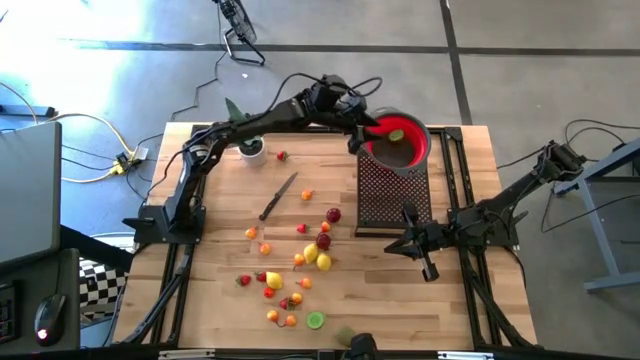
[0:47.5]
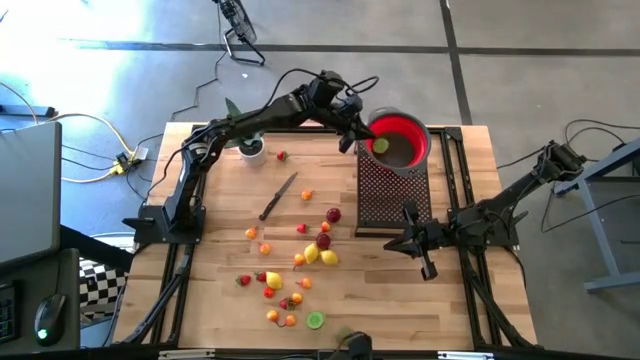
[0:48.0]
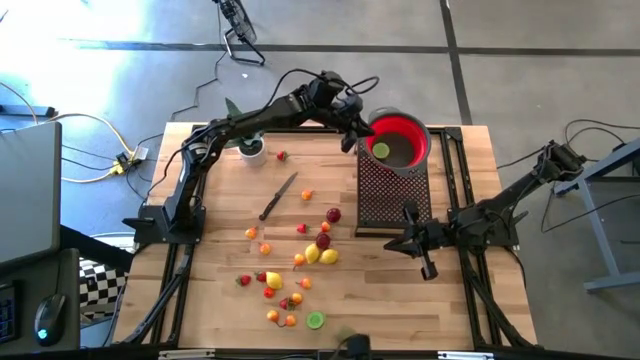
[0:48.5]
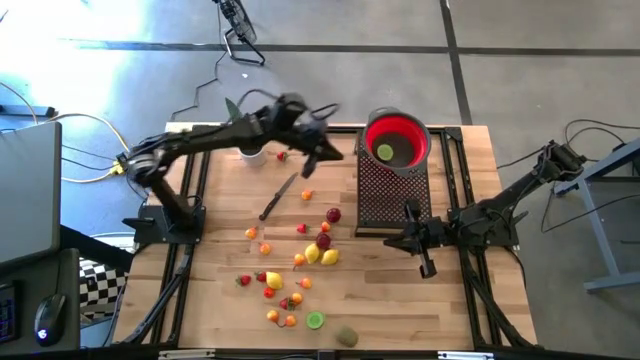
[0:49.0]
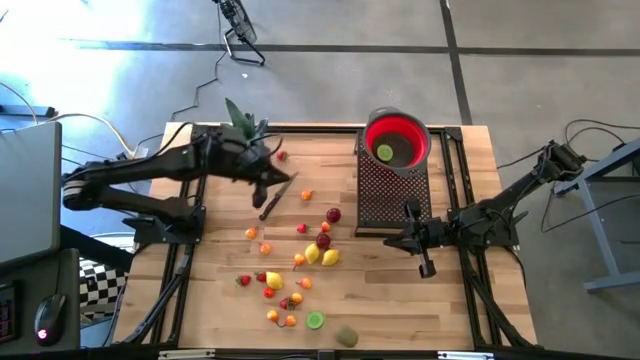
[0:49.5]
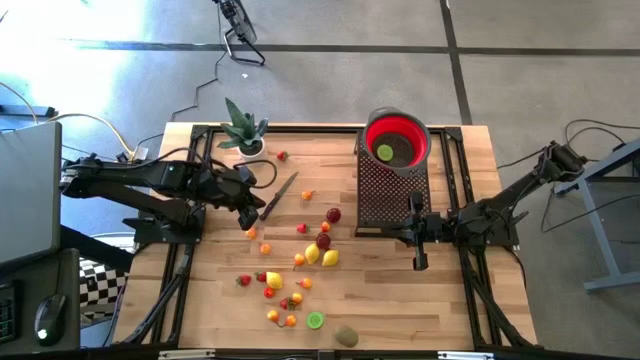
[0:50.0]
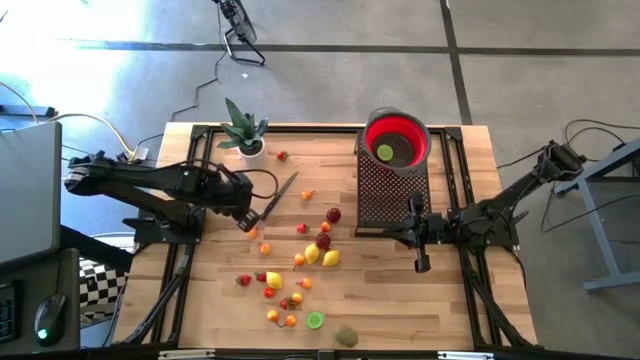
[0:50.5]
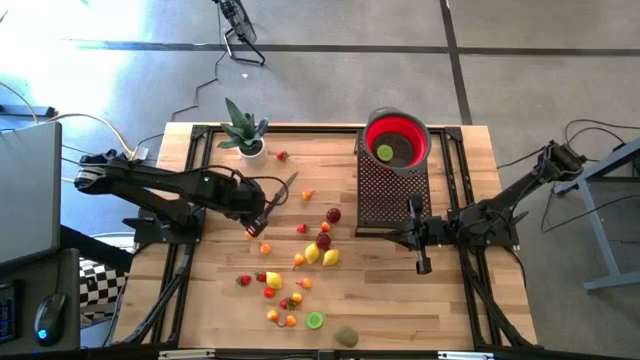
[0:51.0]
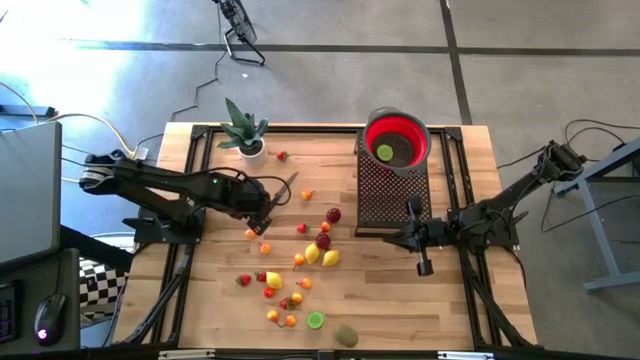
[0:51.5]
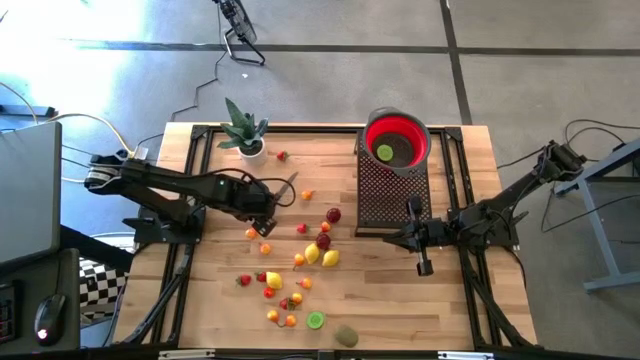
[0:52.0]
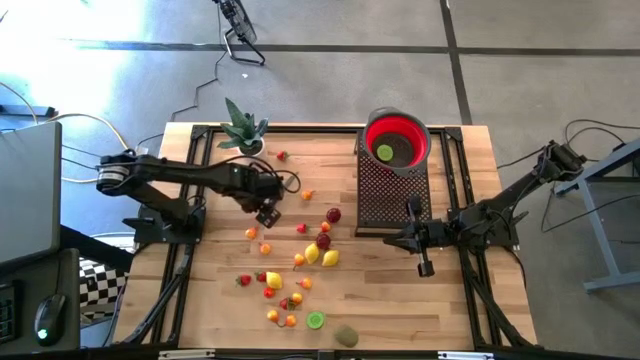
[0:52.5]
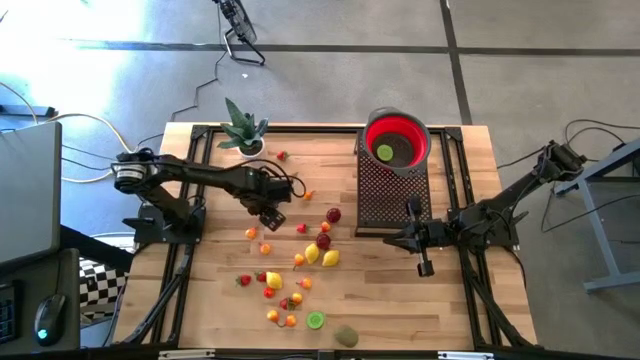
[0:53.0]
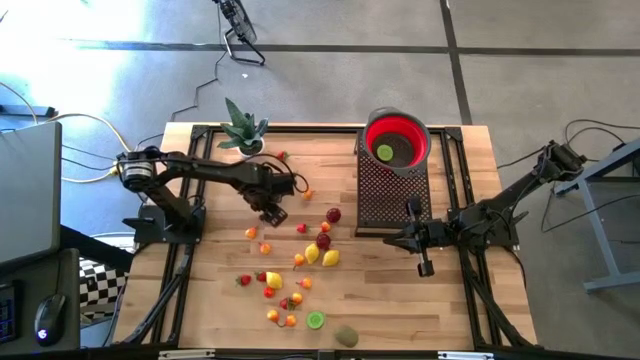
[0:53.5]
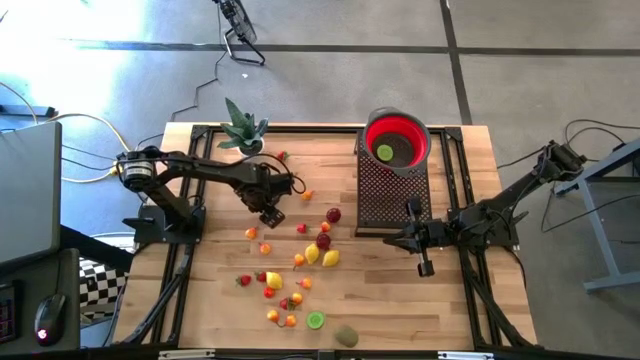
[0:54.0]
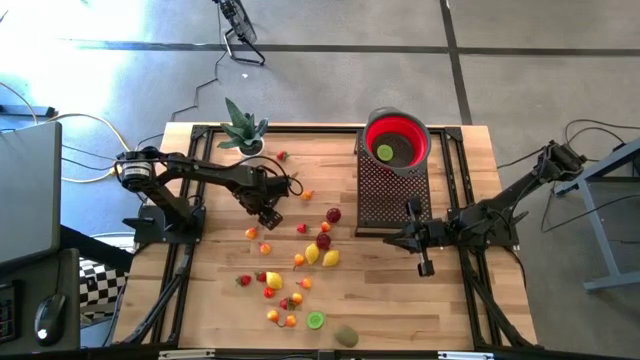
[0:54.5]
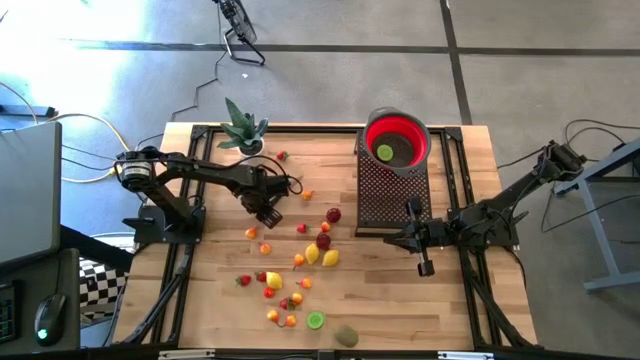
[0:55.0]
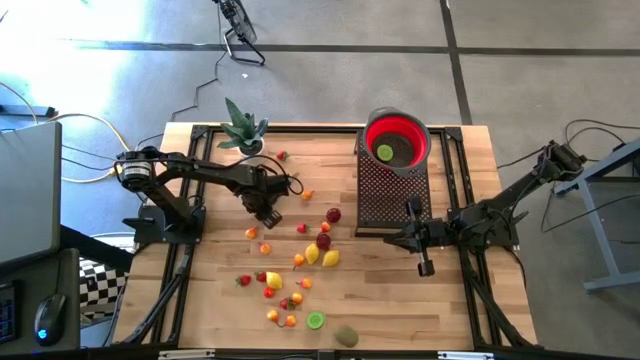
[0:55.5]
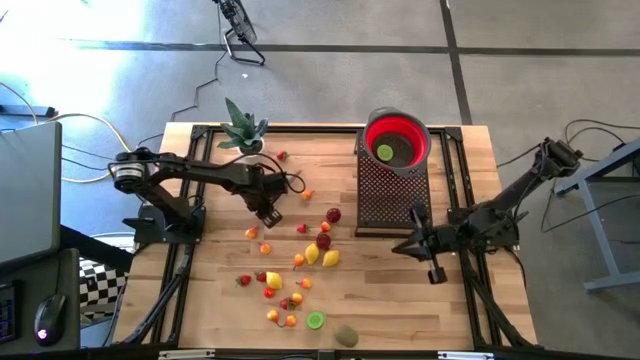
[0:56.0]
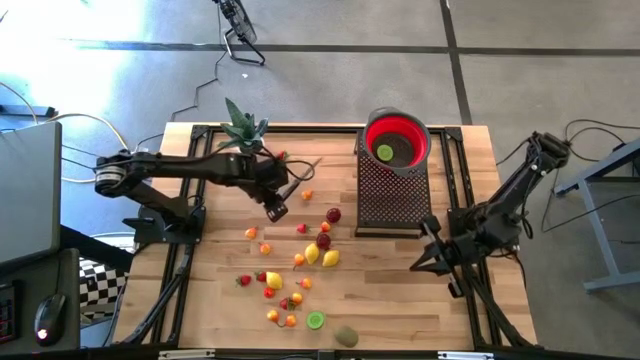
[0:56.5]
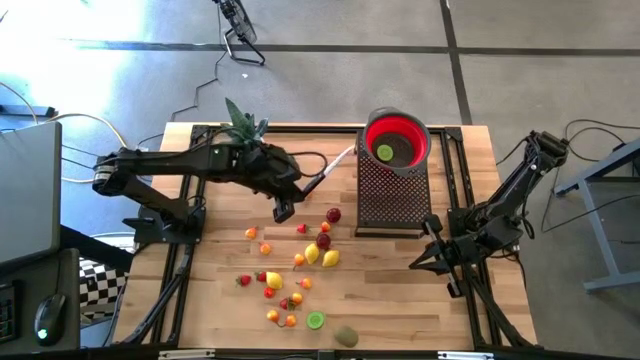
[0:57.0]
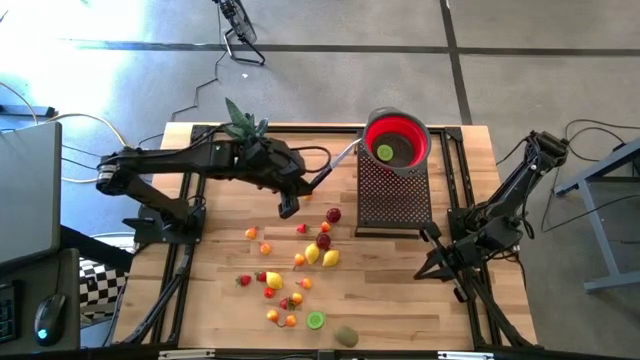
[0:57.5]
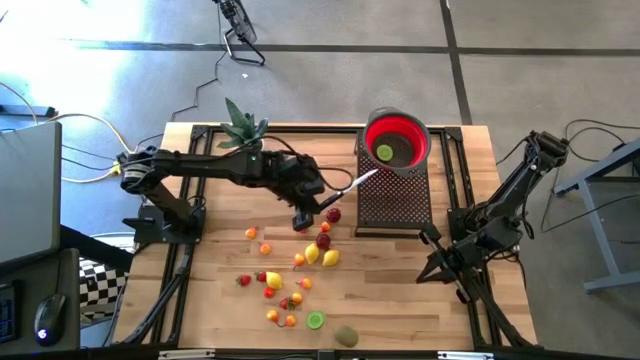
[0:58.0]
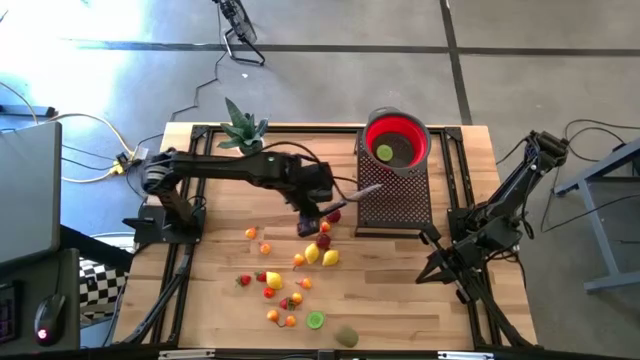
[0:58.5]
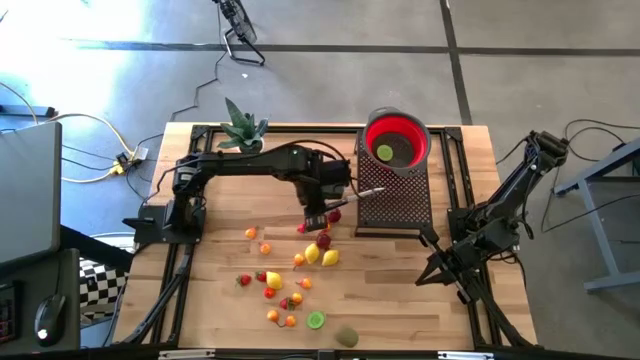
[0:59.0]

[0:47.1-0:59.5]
Task: Pick & Place Fruit
Put the knife on the shelf

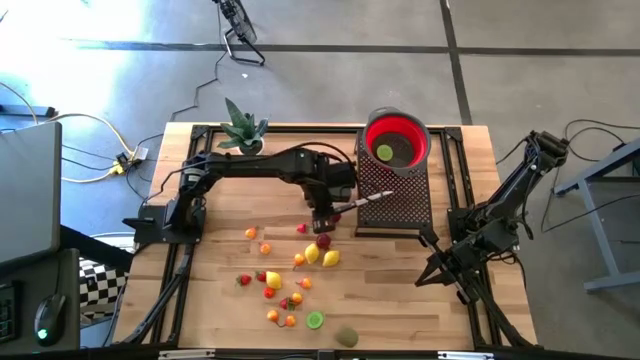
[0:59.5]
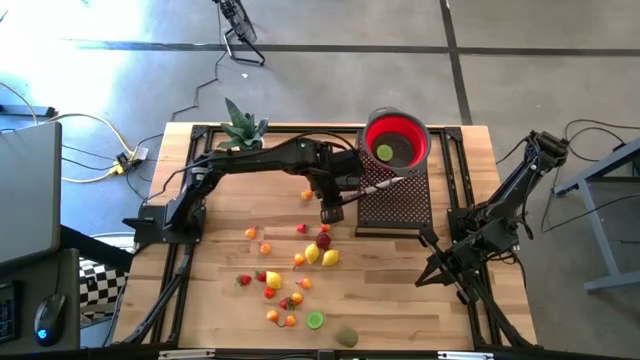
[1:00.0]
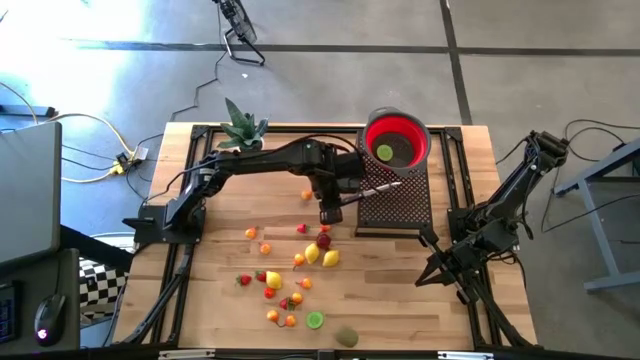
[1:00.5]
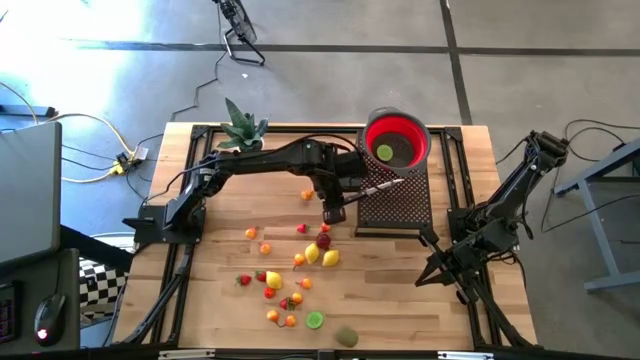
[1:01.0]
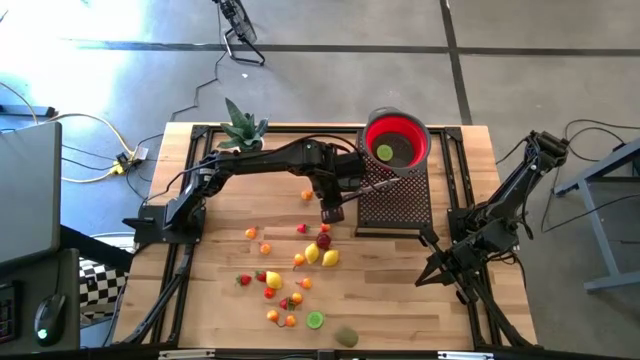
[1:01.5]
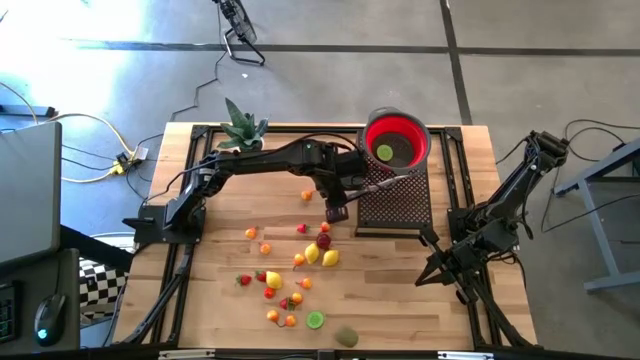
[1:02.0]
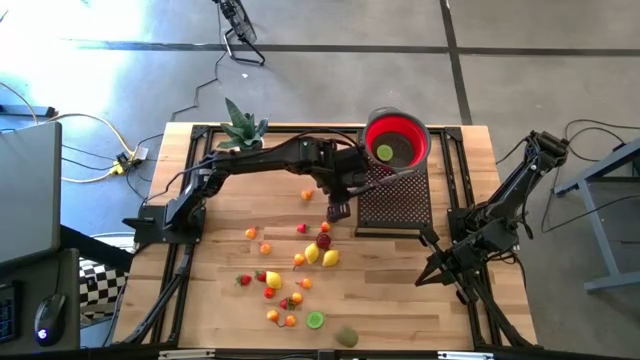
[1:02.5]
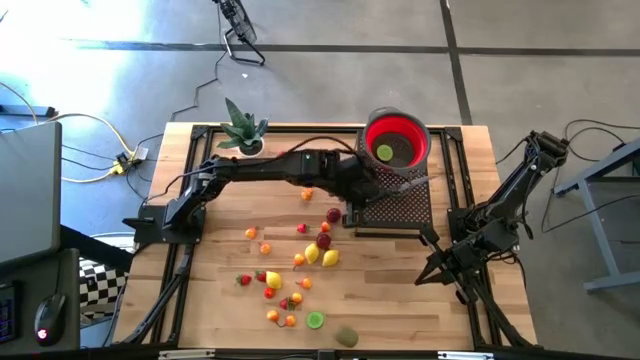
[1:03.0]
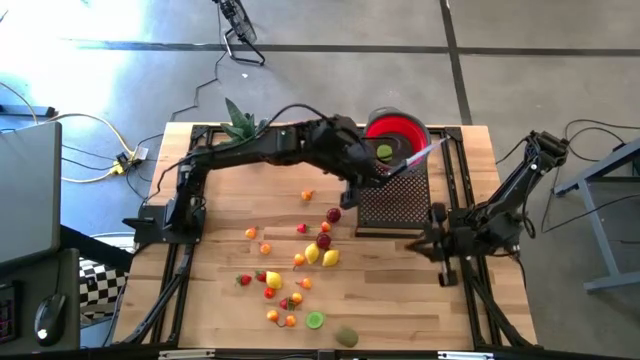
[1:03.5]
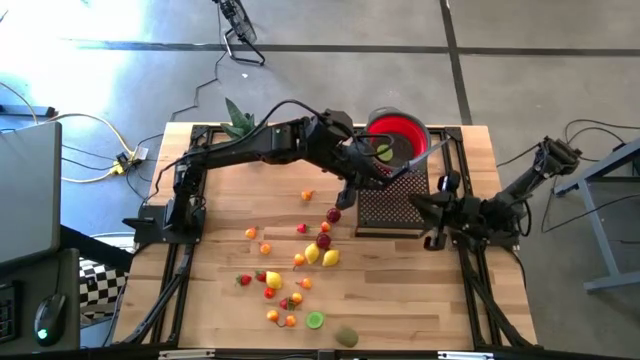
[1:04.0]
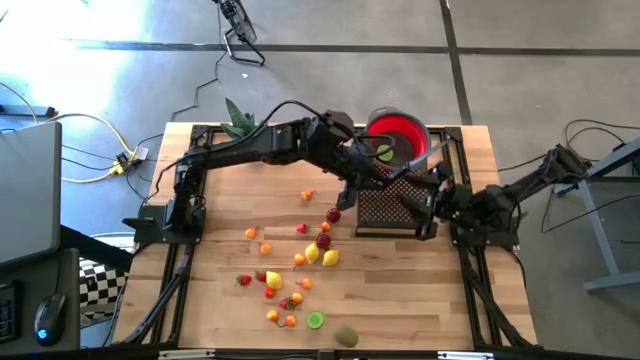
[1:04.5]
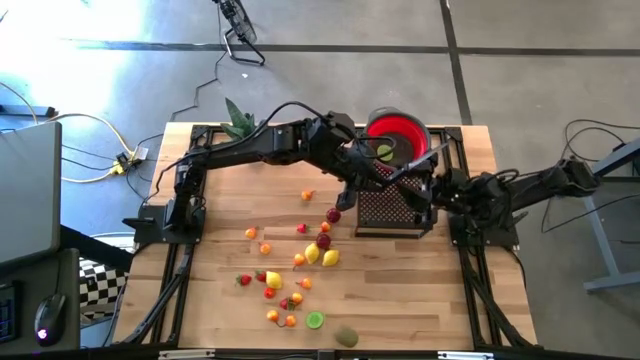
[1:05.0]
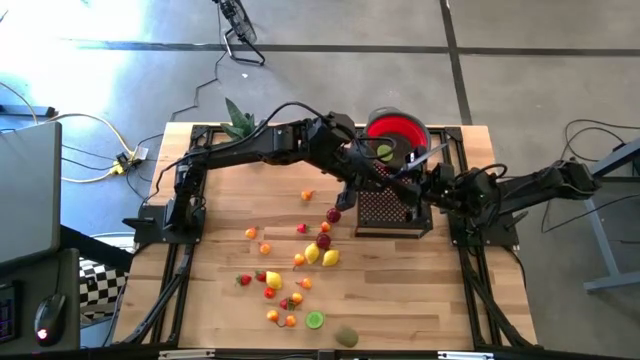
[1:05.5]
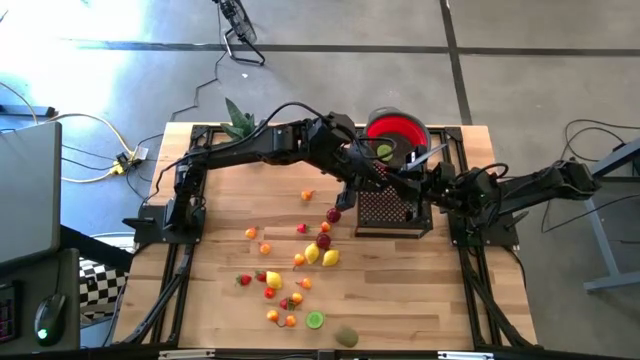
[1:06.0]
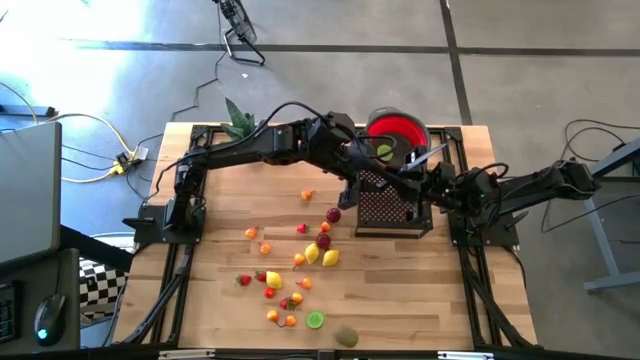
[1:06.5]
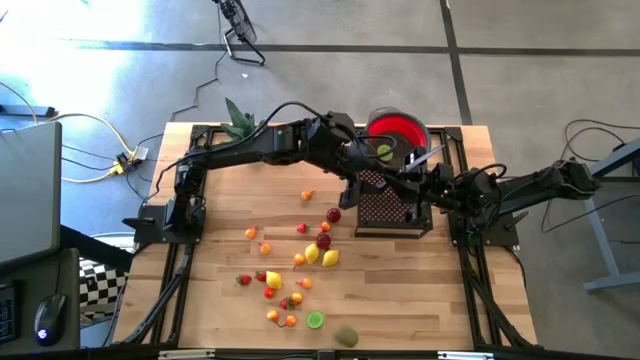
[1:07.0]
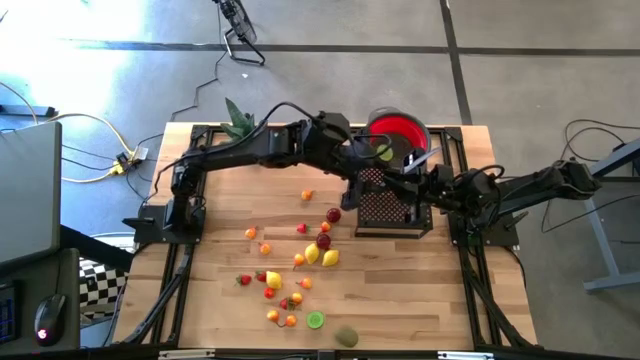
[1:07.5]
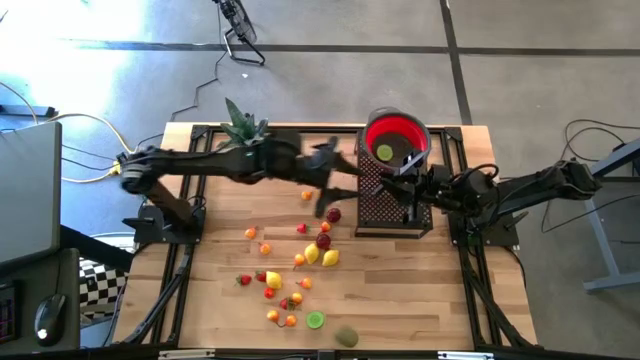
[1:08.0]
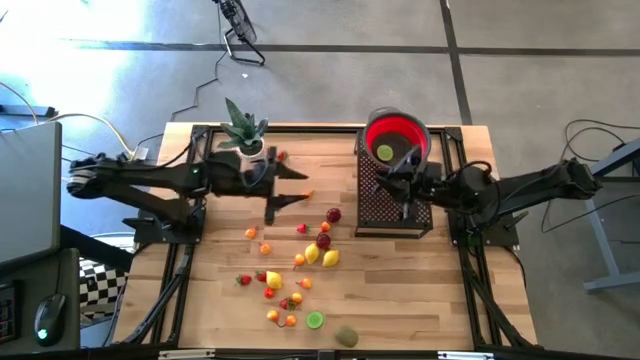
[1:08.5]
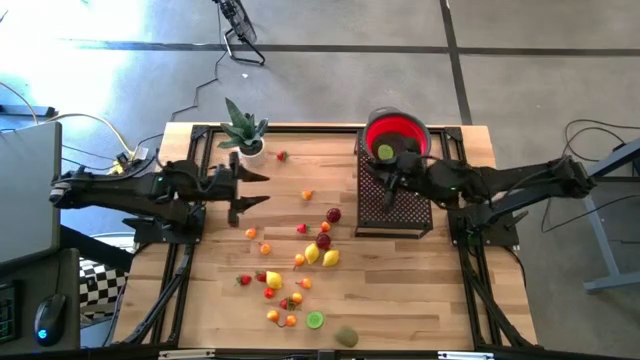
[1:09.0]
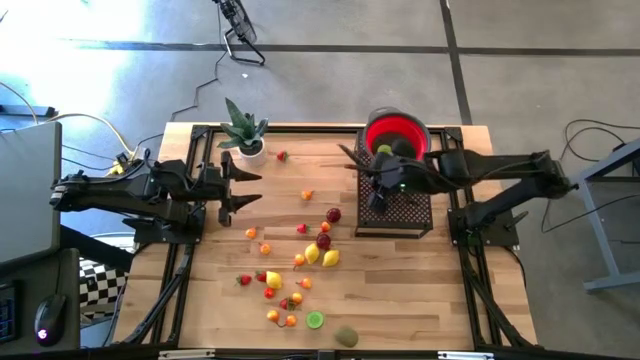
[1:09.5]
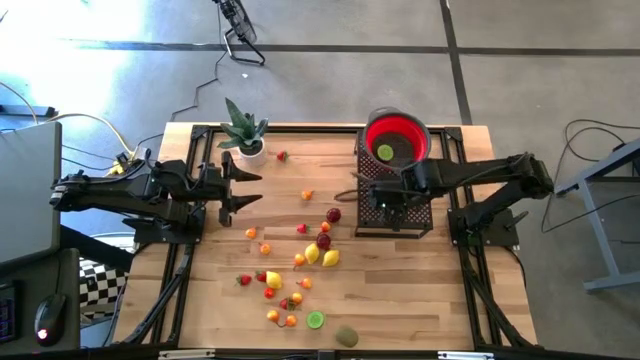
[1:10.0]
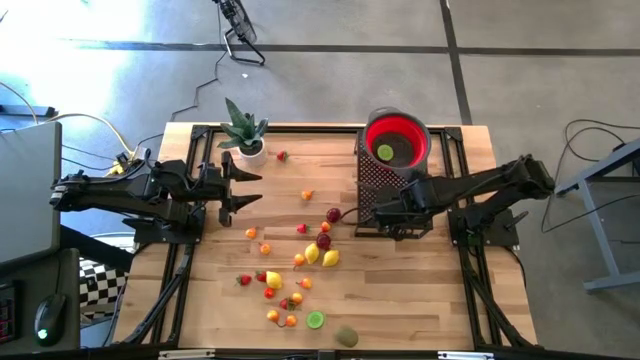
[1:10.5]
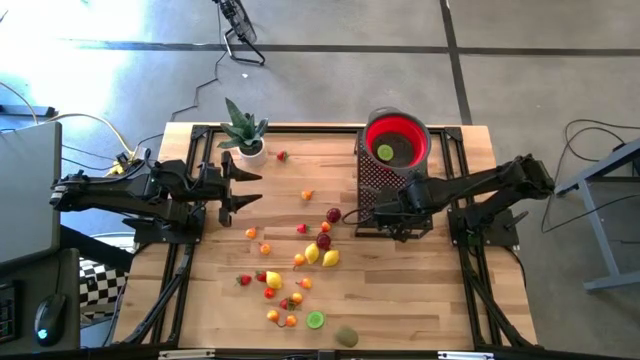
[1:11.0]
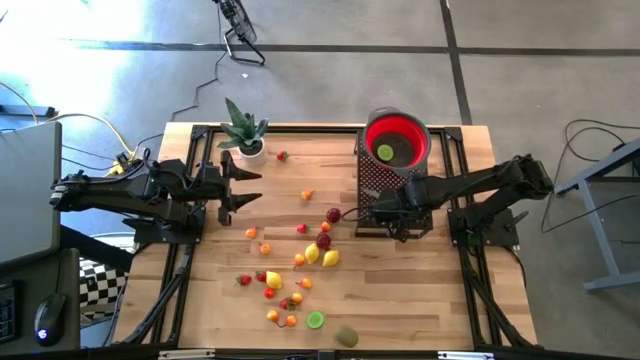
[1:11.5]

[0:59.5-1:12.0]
Put the knife on the shelf
